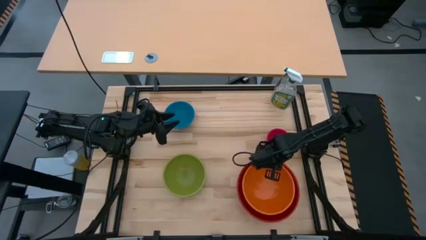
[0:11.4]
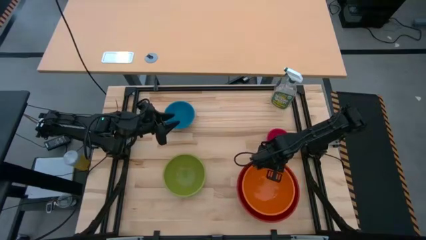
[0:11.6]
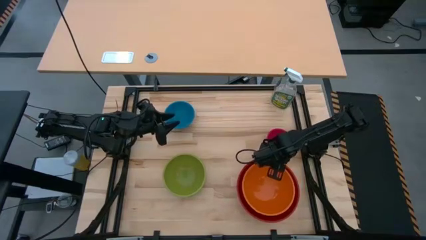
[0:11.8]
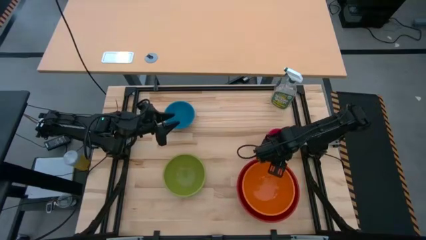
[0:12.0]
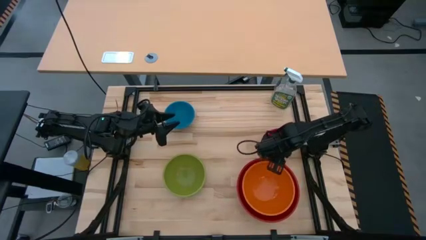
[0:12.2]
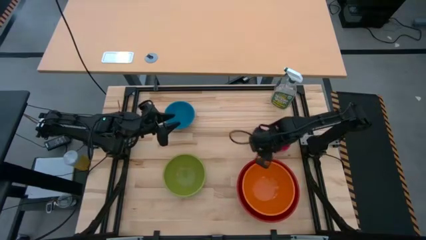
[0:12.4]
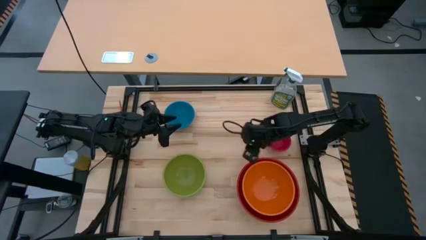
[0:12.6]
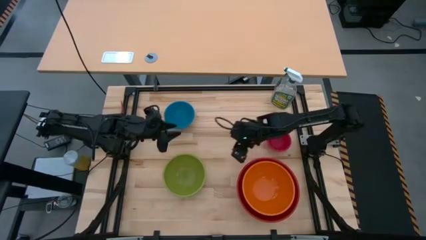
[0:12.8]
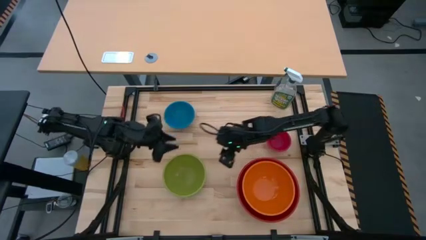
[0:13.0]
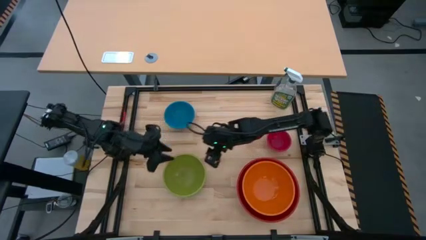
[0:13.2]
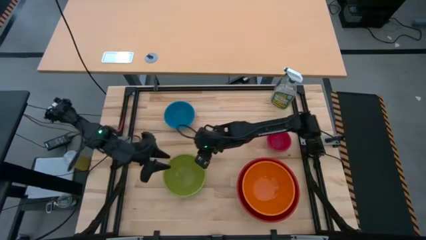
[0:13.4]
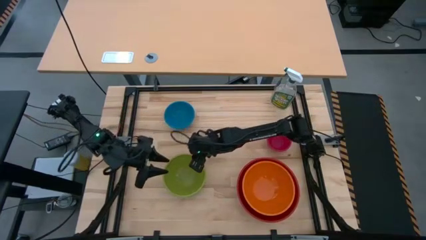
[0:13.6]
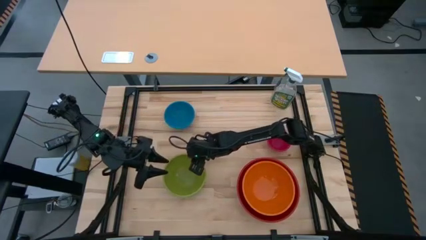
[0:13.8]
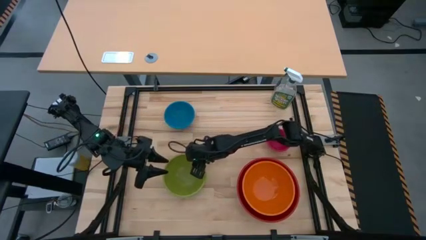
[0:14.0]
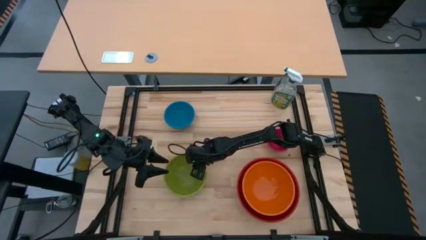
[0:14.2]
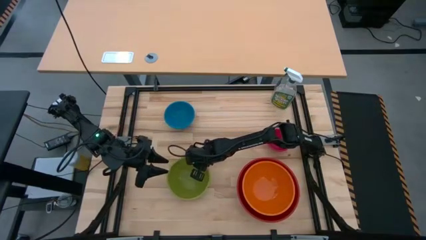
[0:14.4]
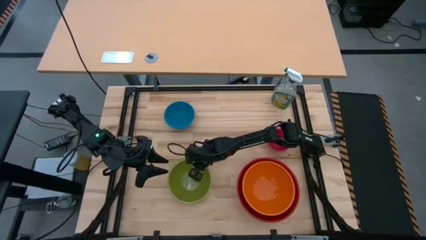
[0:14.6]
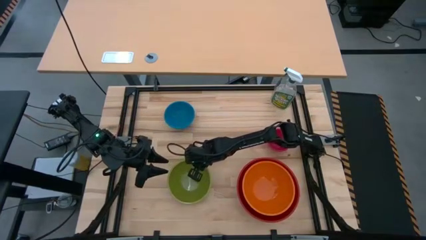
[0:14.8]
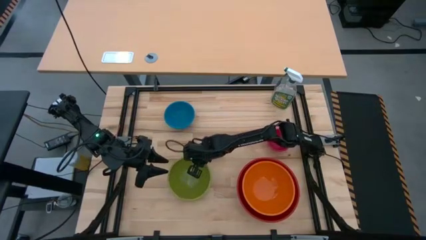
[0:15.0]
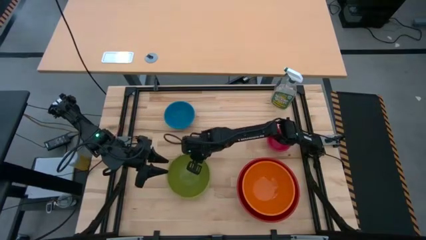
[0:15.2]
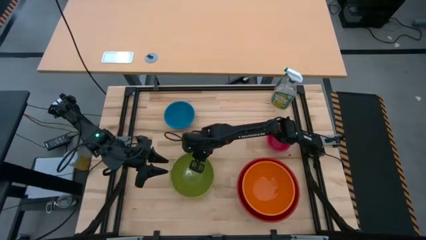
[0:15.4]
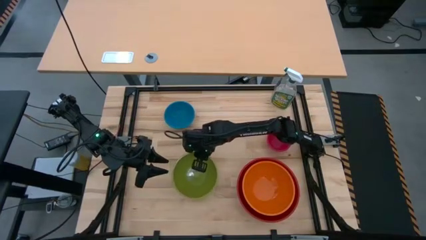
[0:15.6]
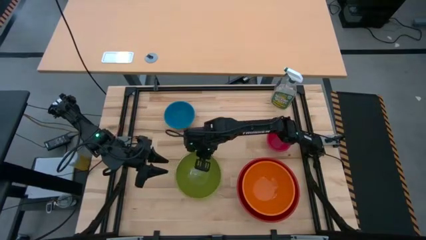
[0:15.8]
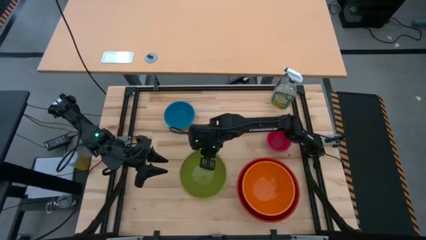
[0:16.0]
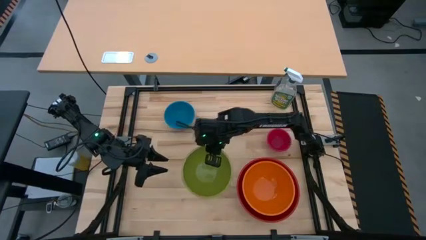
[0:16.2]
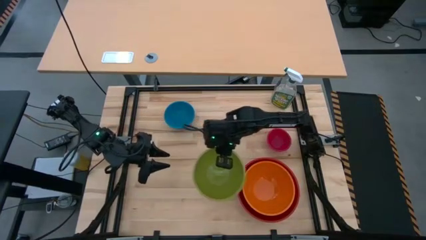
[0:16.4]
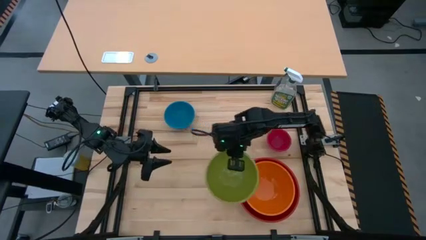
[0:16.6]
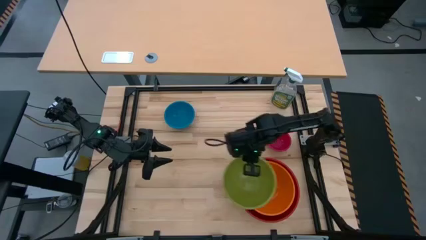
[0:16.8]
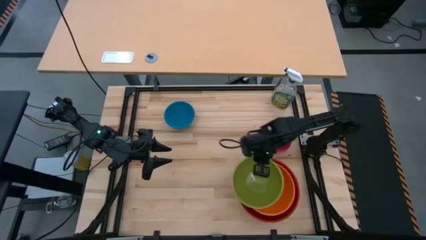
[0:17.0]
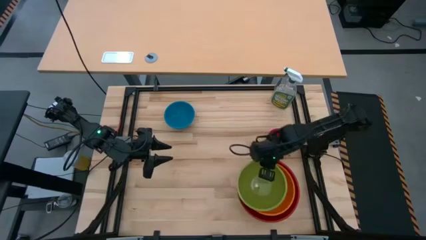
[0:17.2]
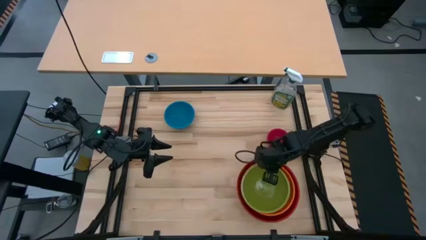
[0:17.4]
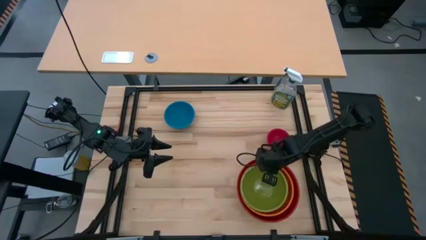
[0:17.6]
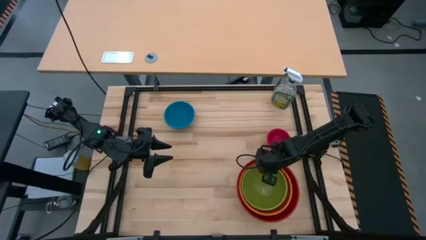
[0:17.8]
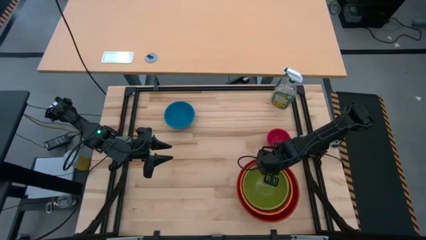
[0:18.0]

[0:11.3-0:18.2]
Stack the green bowl on the orange bowl

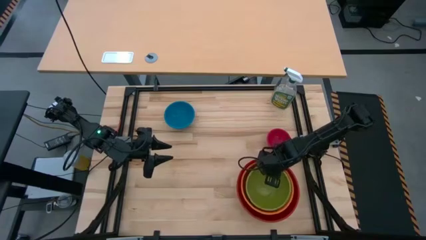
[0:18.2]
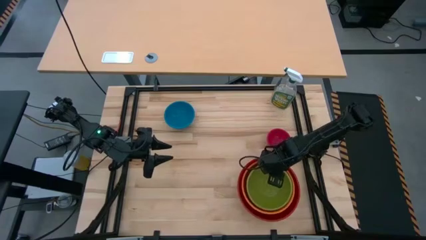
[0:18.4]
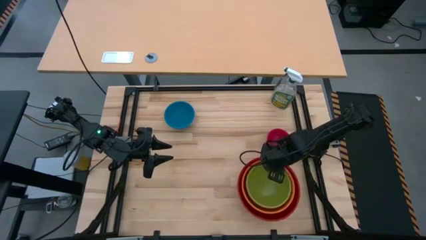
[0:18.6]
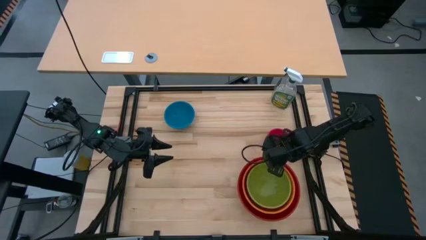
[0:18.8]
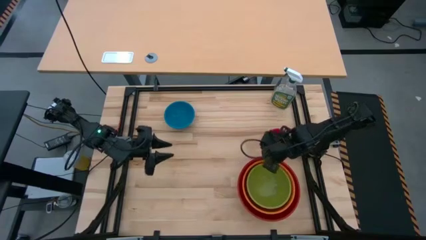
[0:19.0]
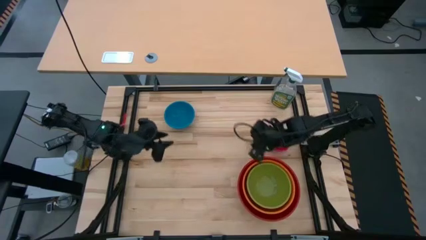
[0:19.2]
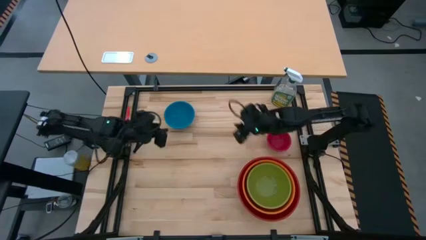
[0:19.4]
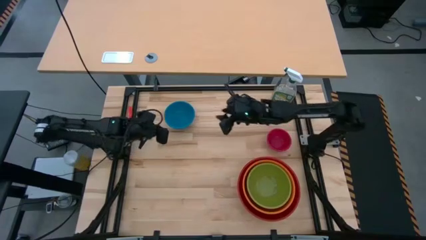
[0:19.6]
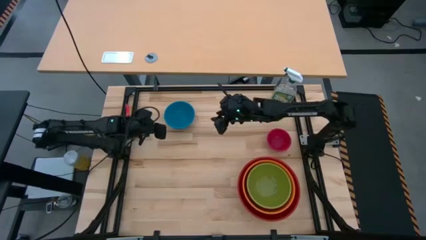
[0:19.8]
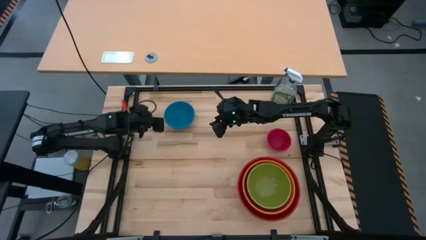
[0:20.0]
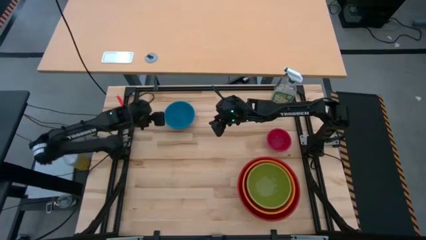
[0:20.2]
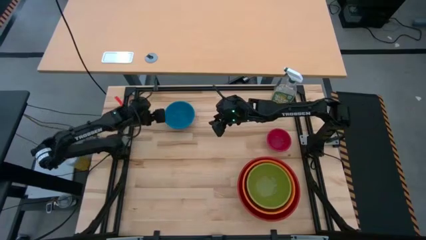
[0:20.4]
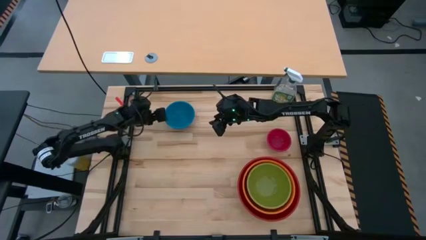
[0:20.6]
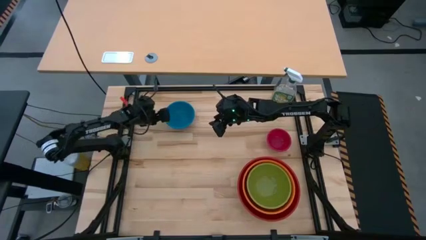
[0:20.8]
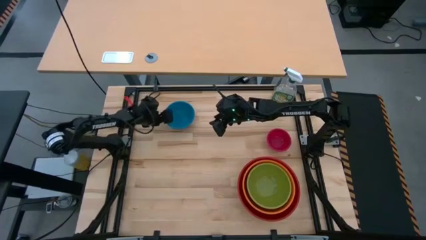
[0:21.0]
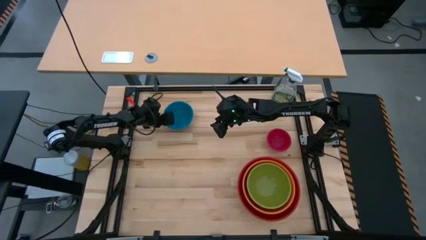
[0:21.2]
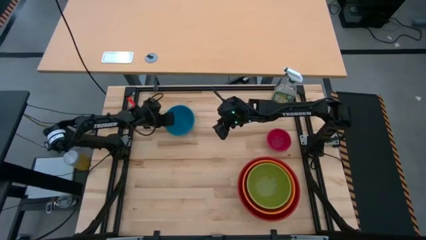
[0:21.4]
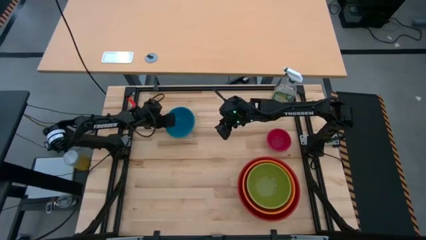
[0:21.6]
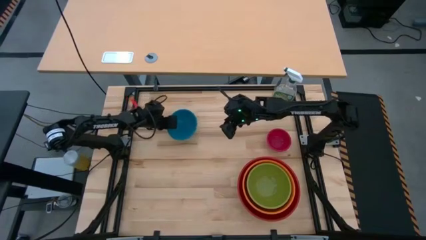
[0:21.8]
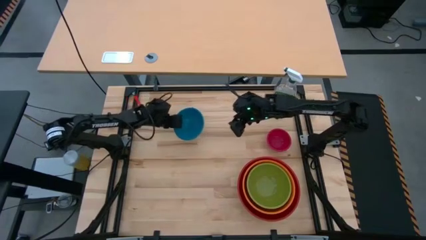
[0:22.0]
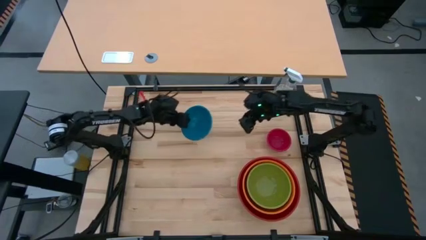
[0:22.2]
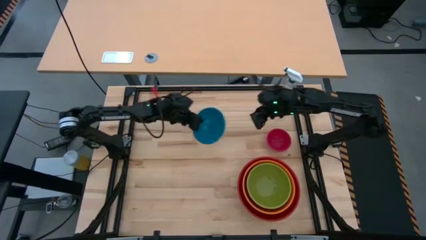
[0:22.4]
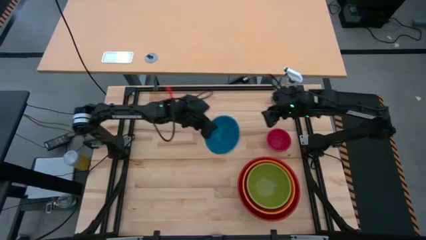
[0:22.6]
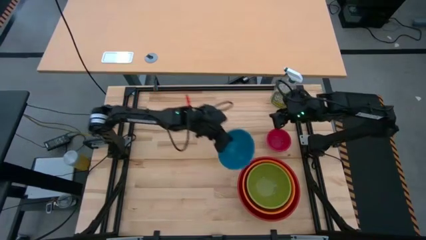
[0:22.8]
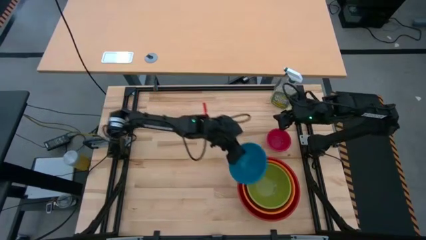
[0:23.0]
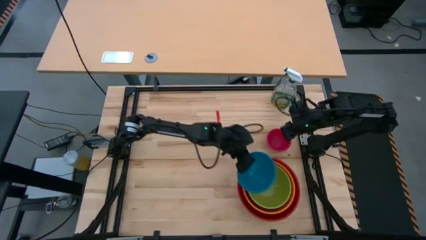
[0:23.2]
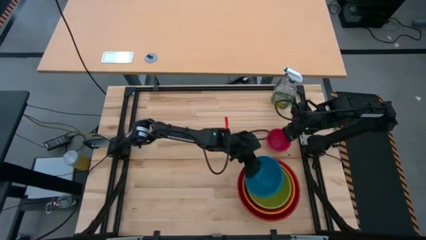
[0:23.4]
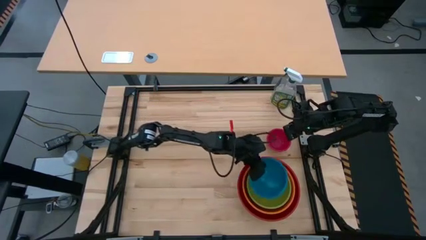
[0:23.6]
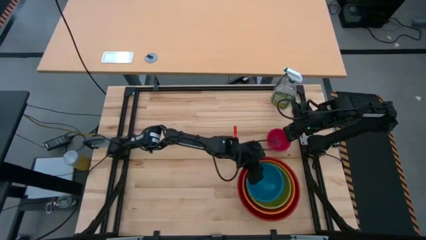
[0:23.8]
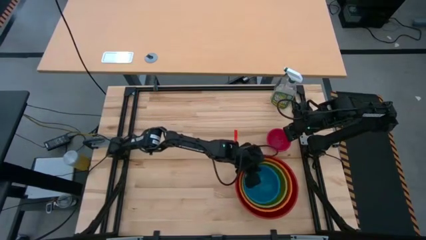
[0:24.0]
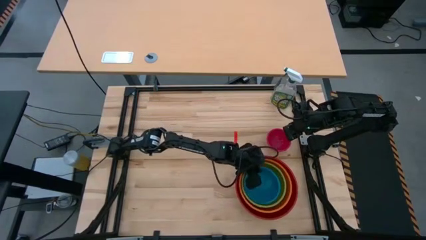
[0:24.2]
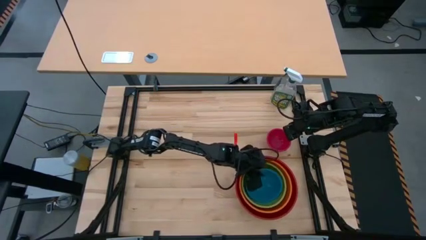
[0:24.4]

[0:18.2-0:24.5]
Stack the blue bowl on the green bowl

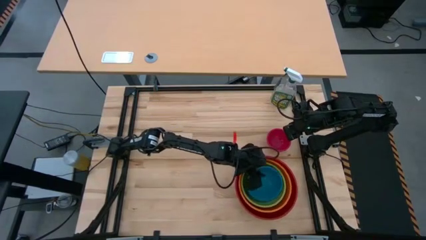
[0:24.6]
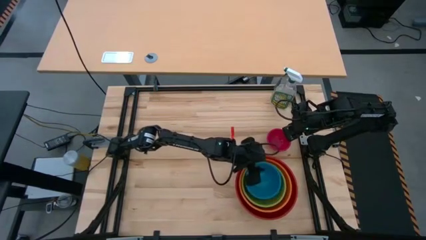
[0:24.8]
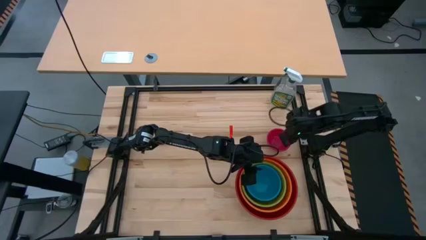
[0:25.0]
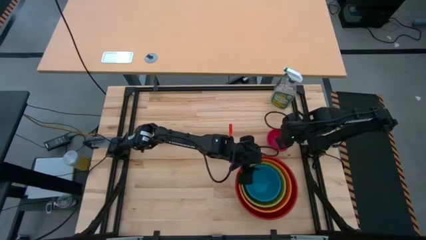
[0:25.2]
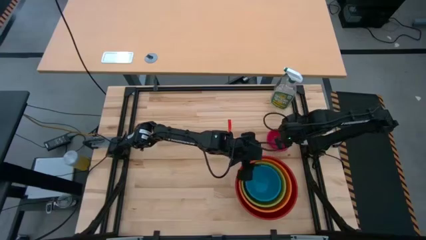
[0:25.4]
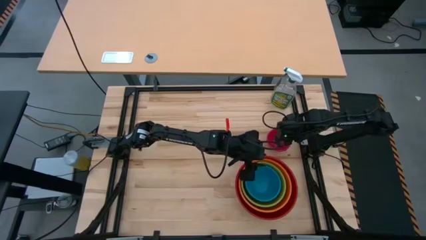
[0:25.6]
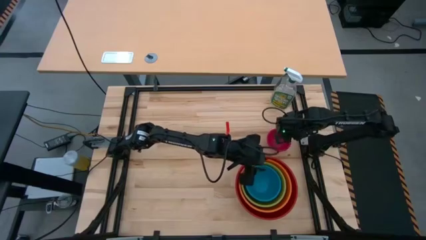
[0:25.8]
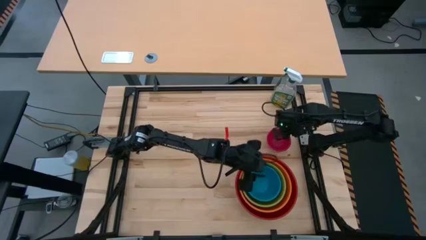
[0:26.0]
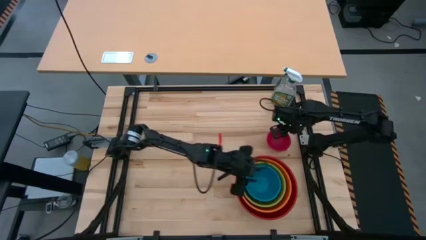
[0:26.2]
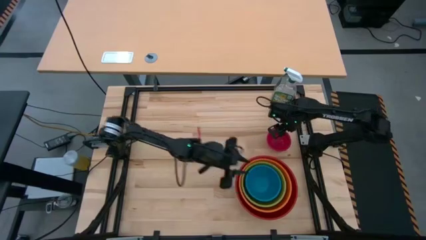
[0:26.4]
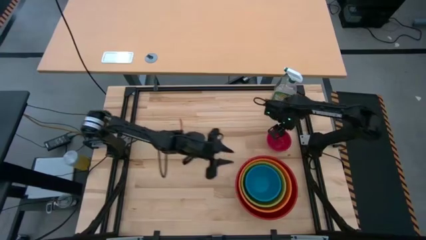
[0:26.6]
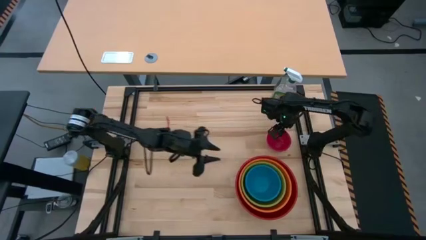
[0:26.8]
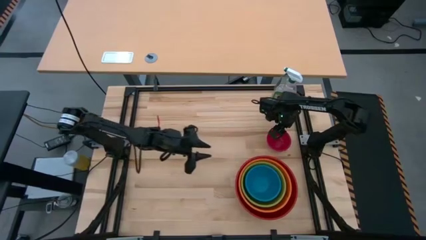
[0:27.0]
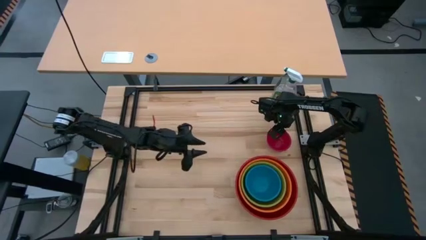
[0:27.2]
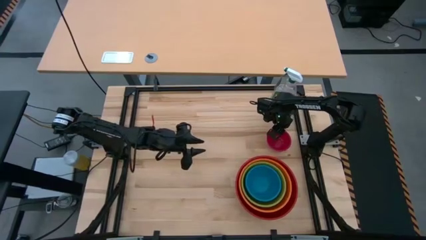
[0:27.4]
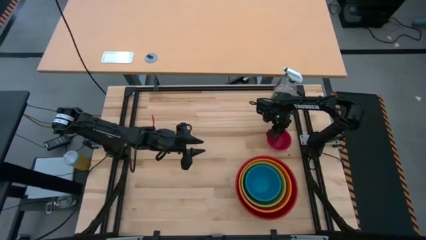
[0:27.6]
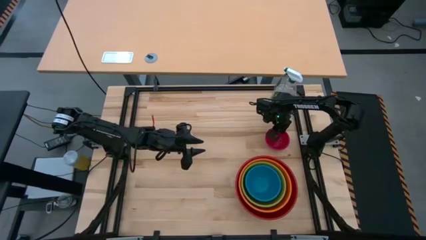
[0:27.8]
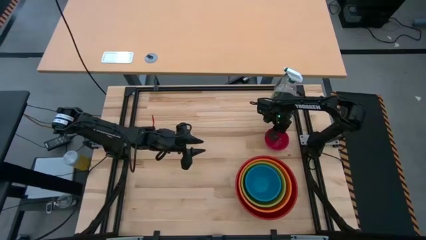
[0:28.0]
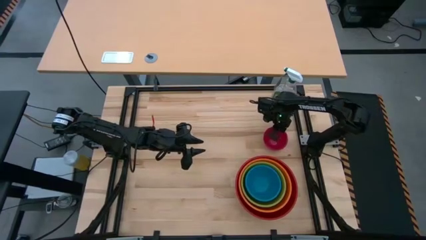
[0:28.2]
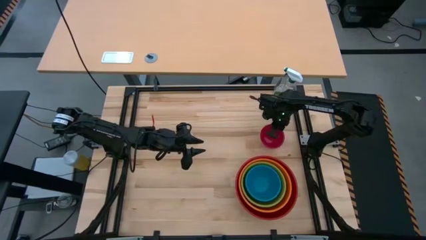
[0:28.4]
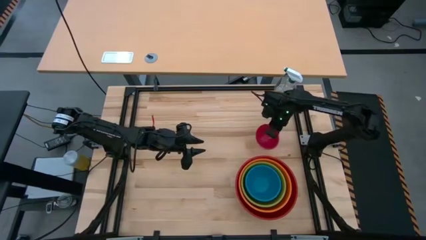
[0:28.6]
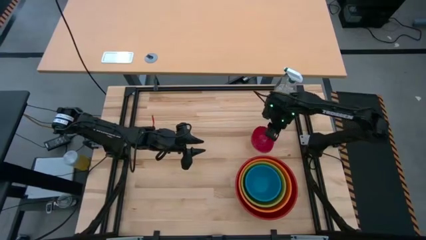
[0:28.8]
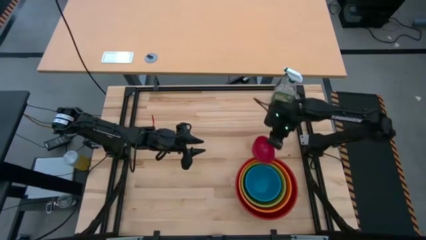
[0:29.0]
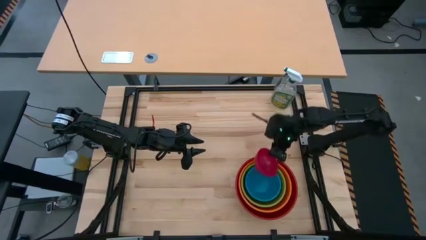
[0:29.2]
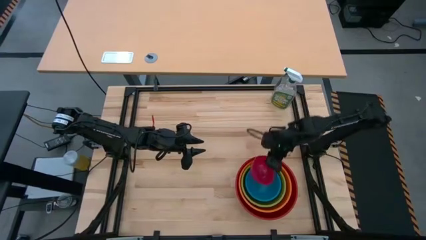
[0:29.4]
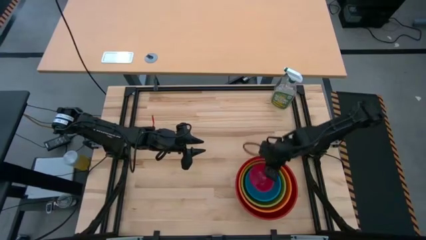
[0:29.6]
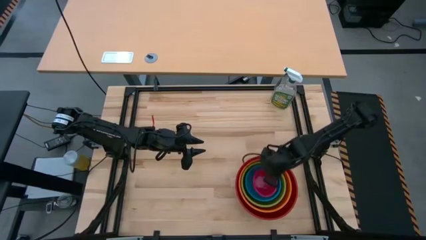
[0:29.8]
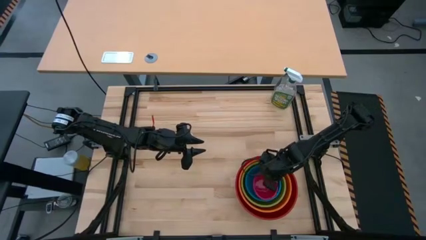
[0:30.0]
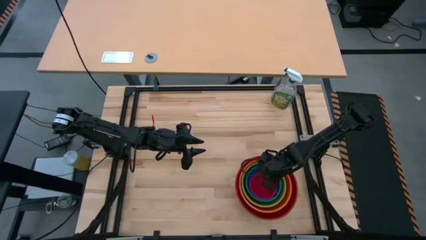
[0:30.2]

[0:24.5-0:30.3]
Stack the pink bowl on the blue bowl
